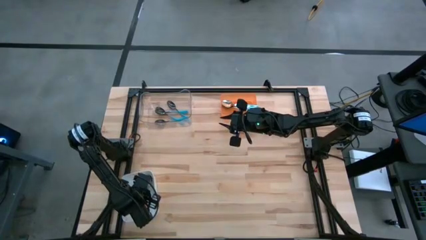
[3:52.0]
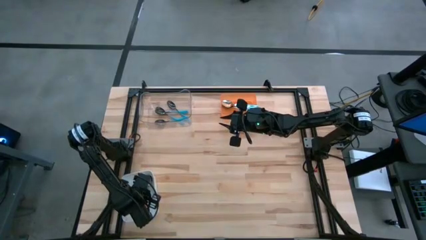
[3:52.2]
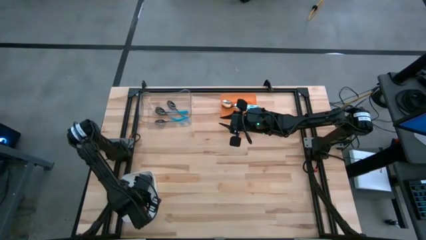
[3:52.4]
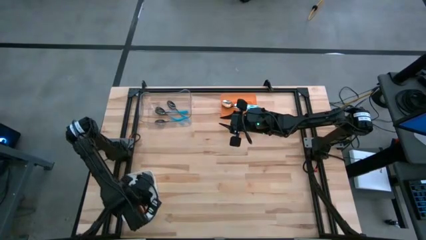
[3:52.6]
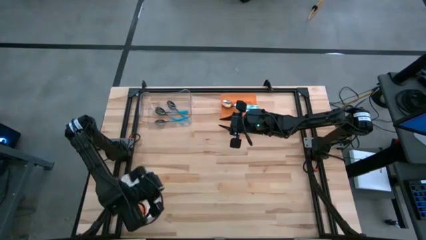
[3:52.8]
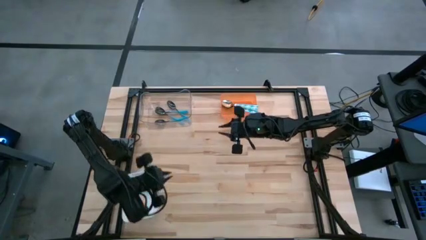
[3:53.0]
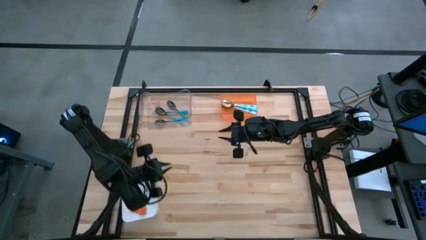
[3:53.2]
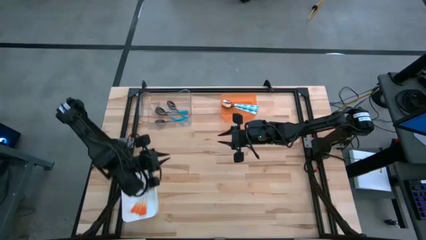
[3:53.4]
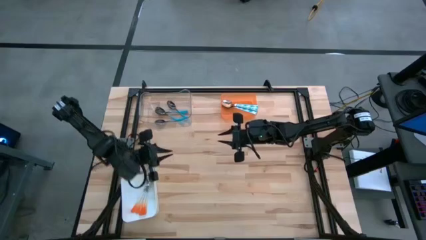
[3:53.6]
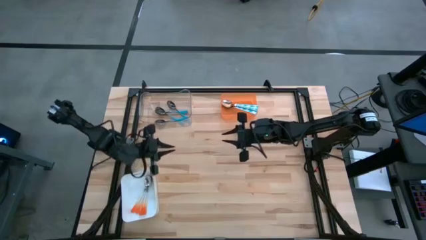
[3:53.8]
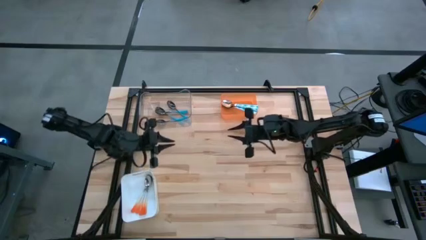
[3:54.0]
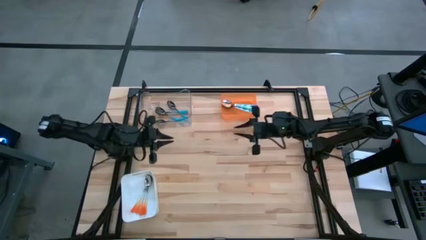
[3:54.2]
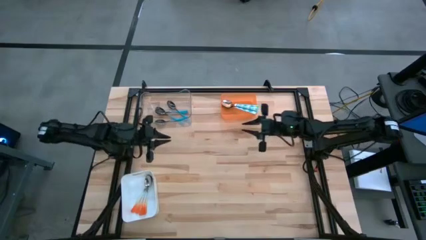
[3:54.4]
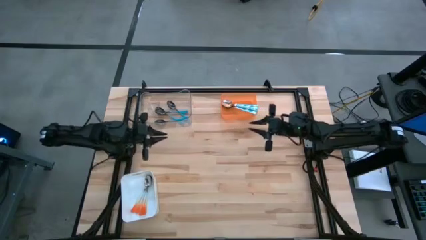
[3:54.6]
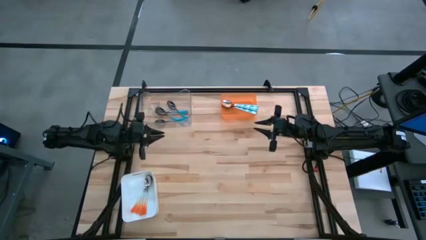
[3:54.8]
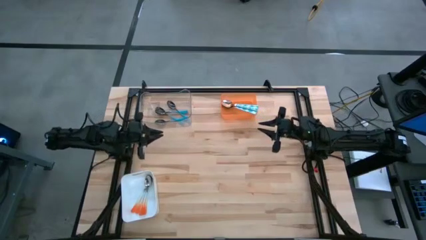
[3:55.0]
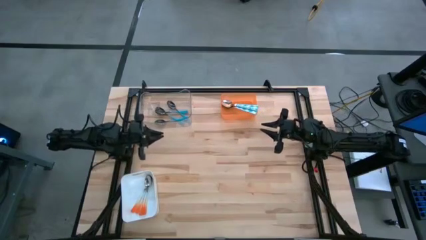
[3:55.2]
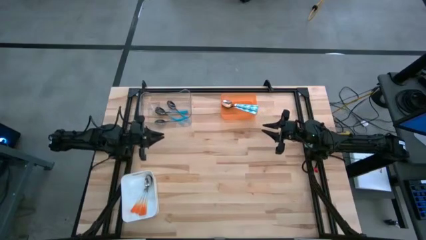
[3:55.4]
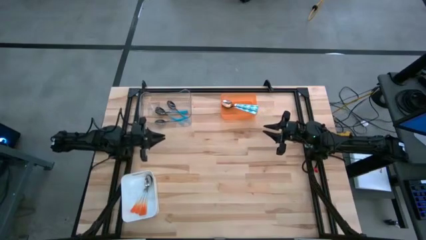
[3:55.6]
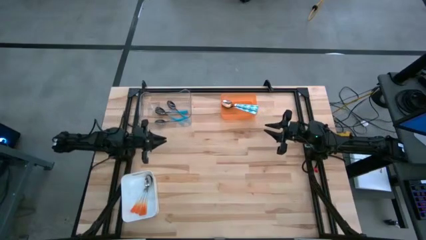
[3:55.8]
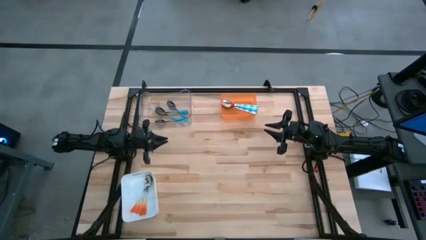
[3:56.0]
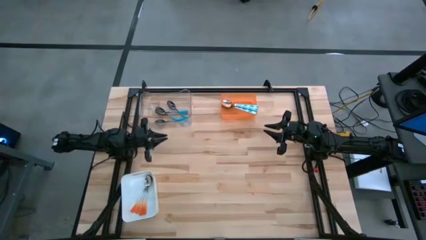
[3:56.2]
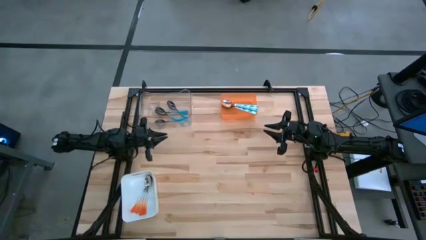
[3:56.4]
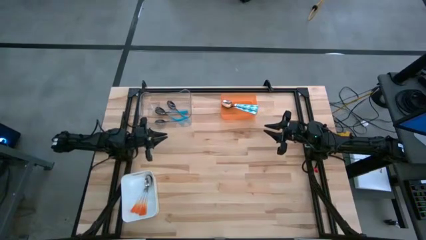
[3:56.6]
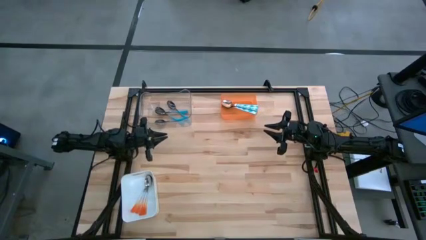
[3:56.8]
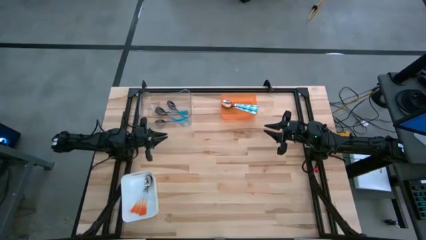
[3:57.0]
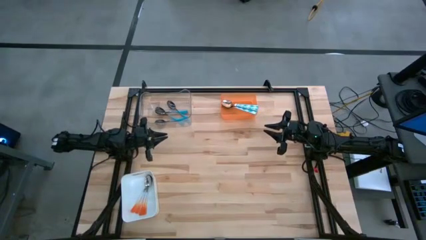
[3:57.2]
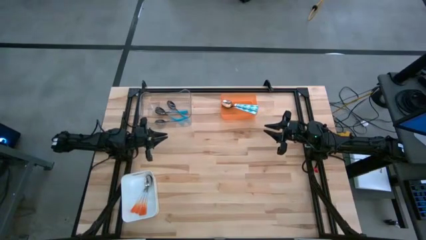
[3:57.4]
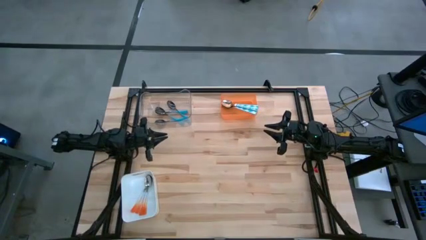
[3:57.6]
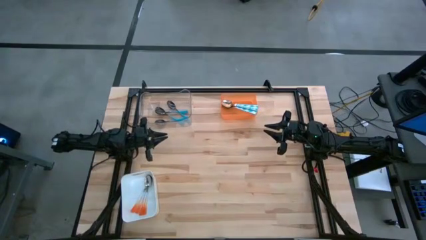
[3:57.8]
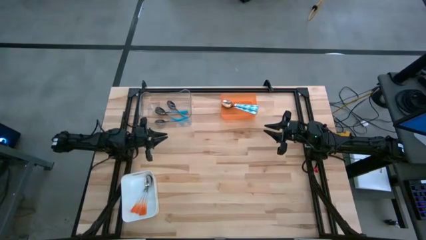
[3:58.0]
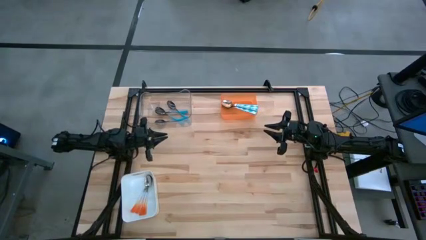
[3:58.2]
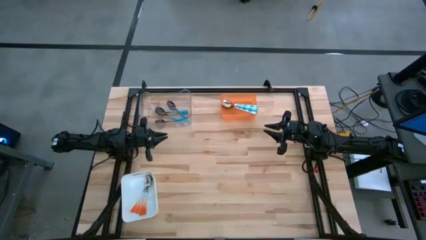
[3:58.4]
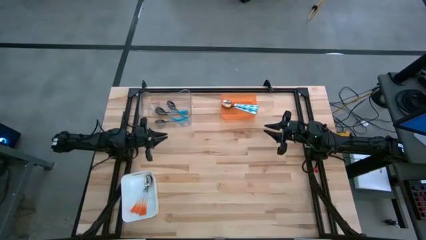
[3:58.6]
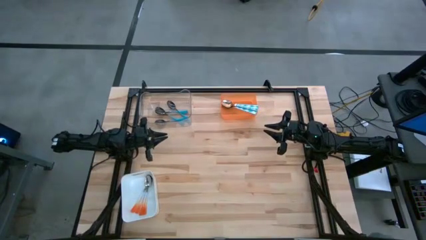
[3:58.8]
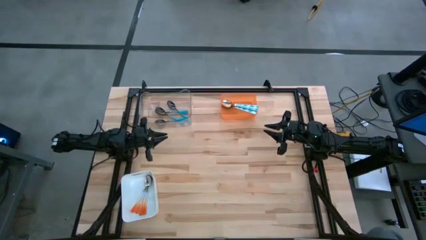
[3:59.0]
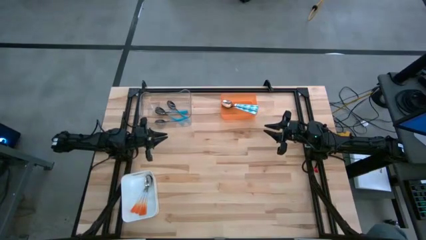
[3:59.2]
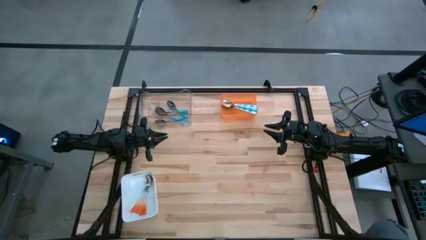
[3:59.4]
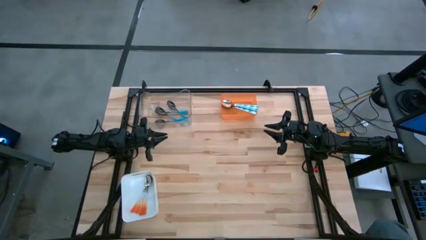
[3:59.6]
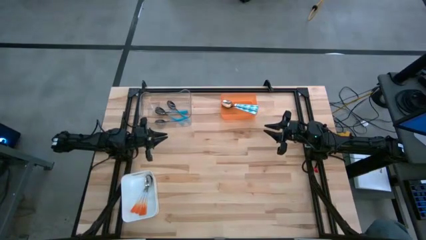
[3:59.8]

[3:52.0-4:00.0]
Task: Sort silverware by color (type)
Return to Home Position

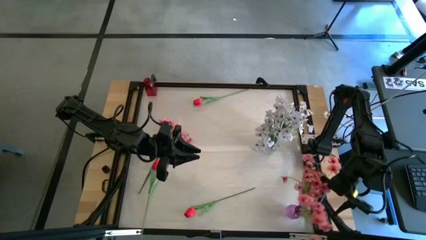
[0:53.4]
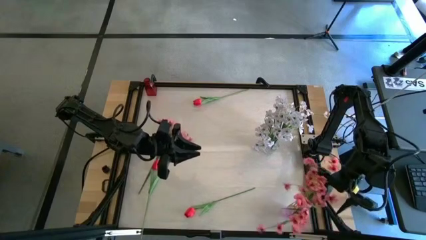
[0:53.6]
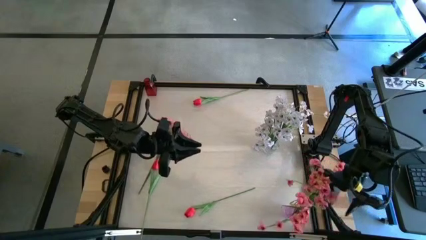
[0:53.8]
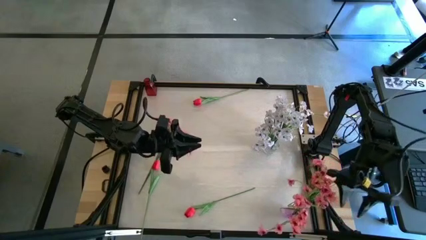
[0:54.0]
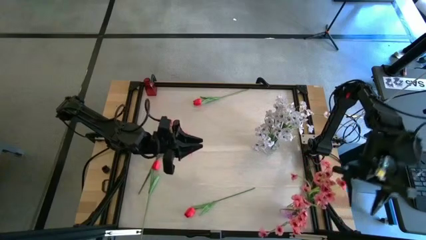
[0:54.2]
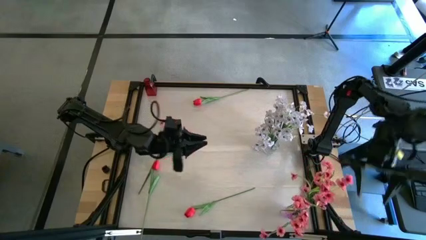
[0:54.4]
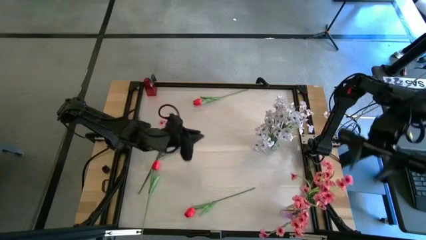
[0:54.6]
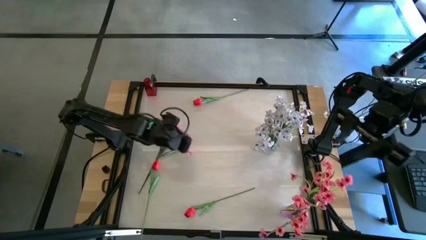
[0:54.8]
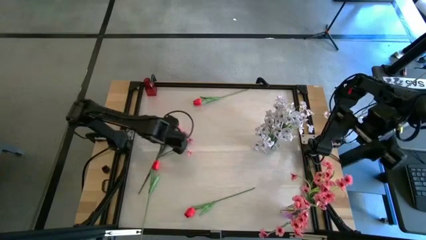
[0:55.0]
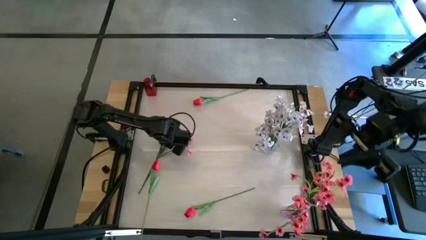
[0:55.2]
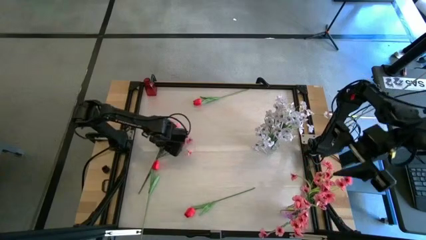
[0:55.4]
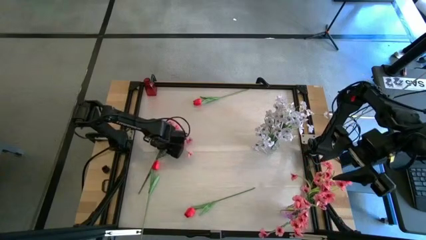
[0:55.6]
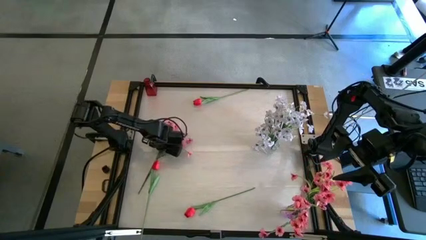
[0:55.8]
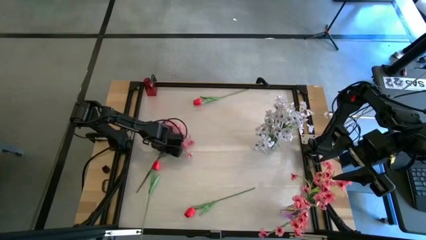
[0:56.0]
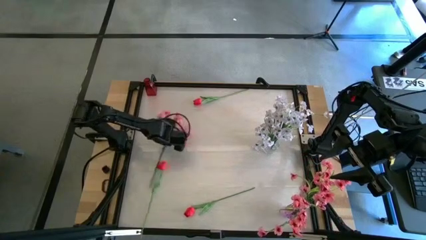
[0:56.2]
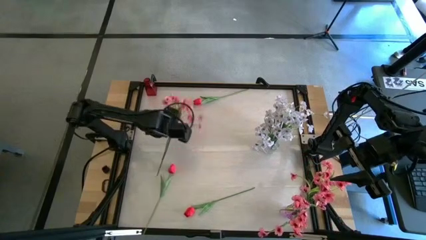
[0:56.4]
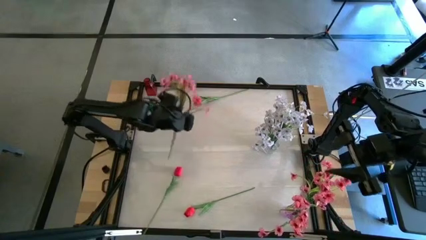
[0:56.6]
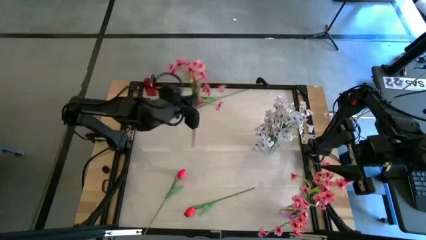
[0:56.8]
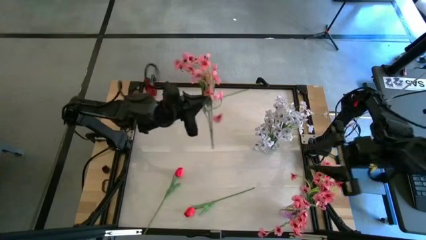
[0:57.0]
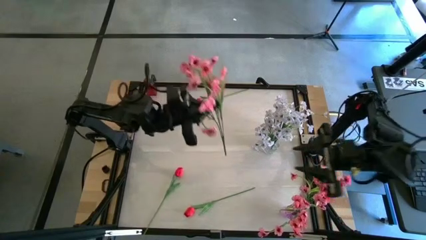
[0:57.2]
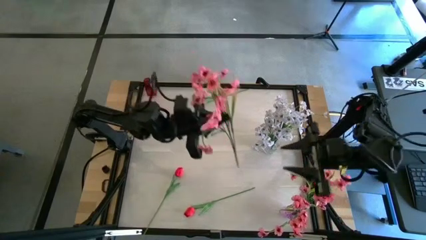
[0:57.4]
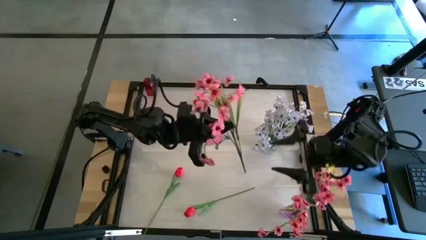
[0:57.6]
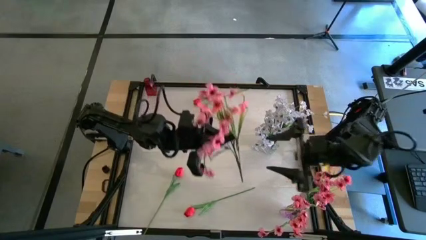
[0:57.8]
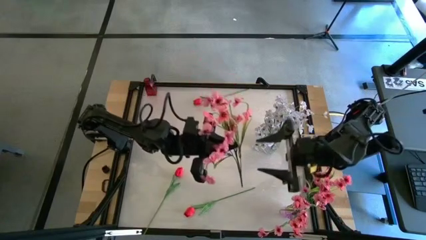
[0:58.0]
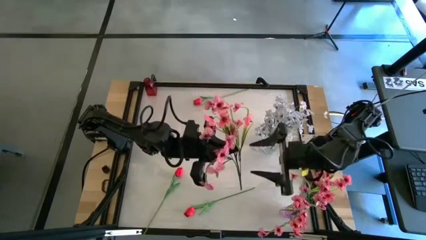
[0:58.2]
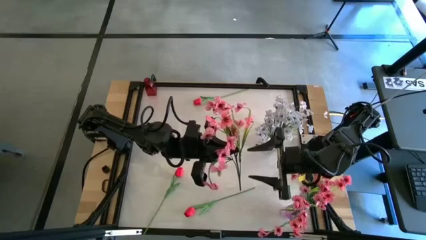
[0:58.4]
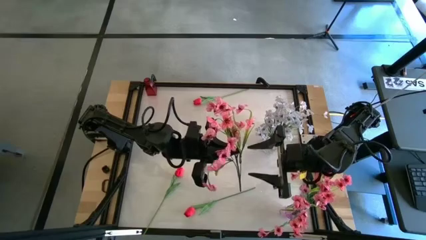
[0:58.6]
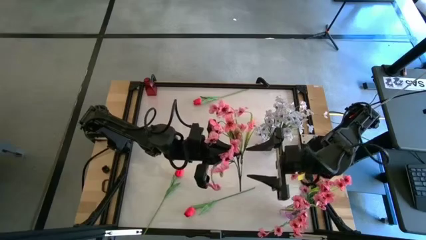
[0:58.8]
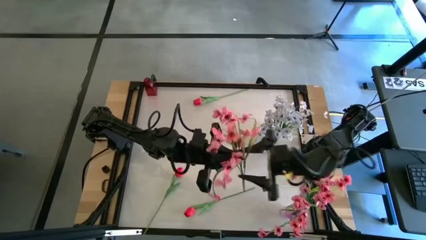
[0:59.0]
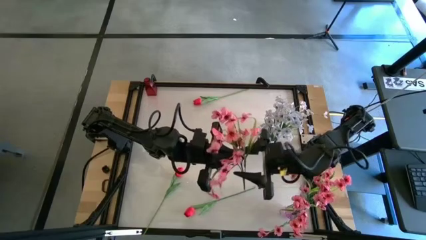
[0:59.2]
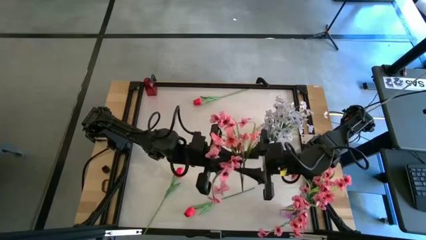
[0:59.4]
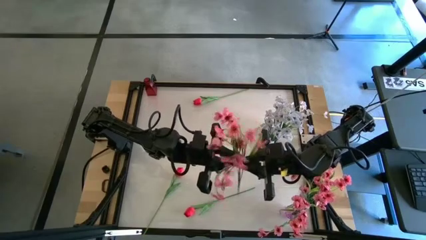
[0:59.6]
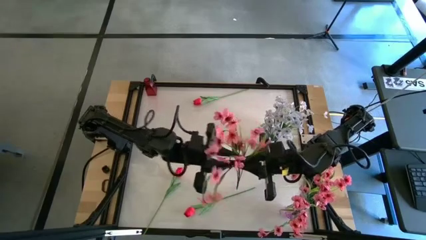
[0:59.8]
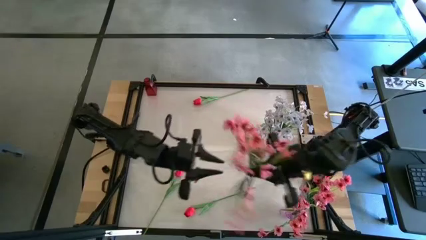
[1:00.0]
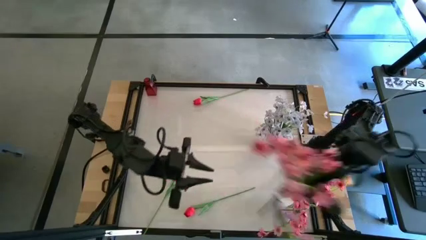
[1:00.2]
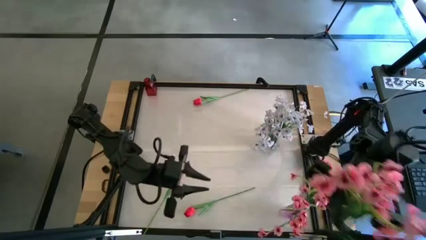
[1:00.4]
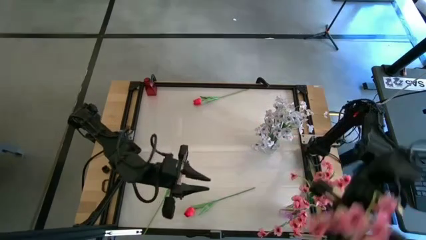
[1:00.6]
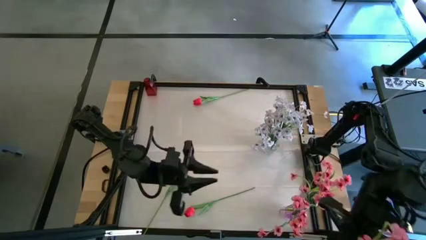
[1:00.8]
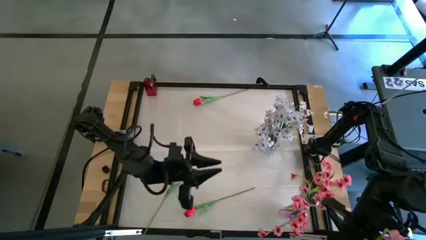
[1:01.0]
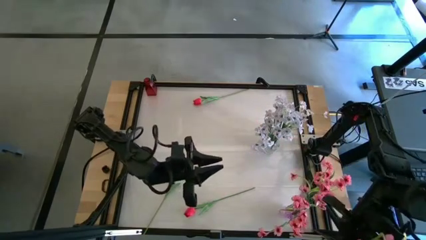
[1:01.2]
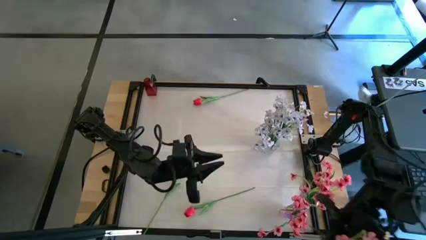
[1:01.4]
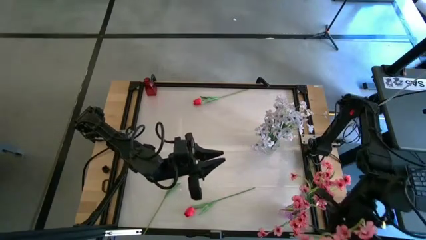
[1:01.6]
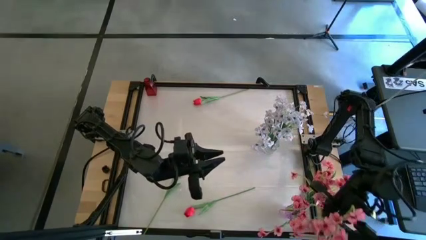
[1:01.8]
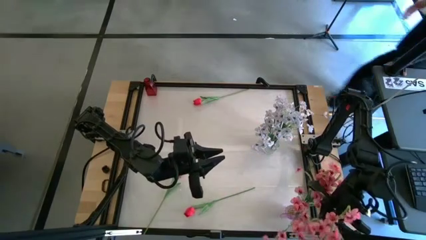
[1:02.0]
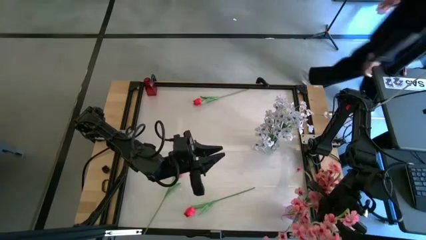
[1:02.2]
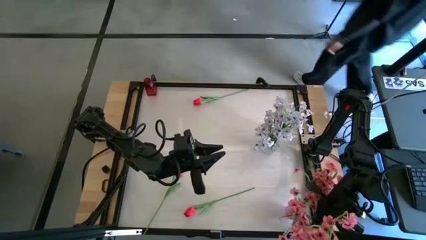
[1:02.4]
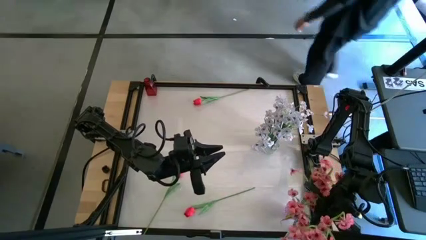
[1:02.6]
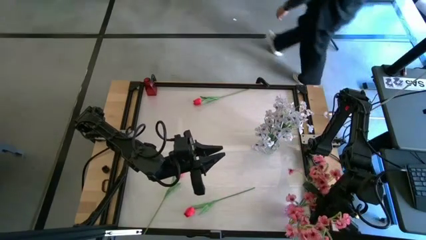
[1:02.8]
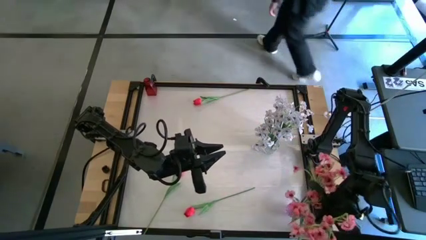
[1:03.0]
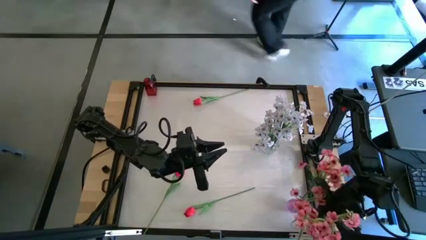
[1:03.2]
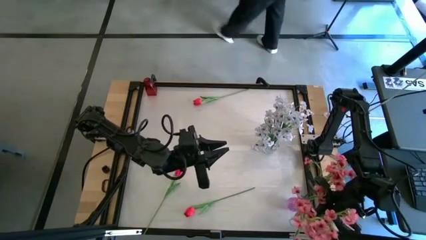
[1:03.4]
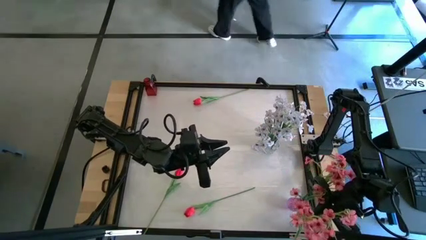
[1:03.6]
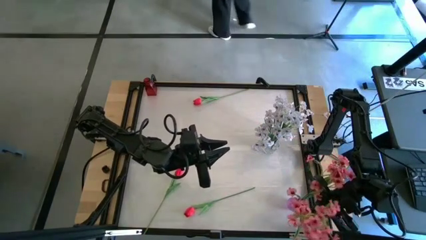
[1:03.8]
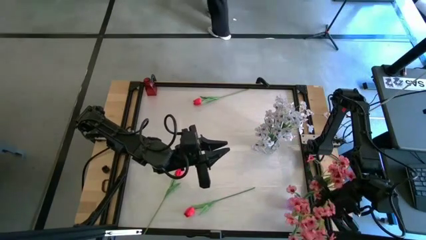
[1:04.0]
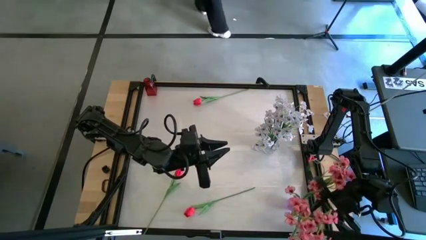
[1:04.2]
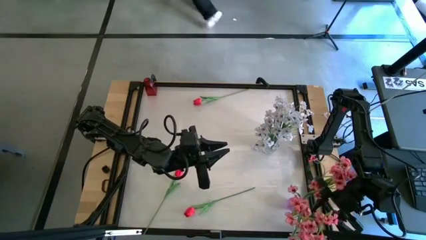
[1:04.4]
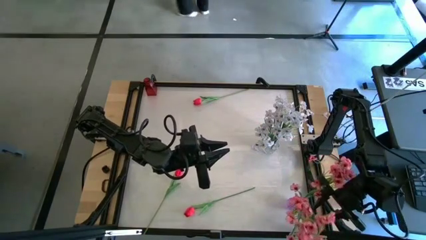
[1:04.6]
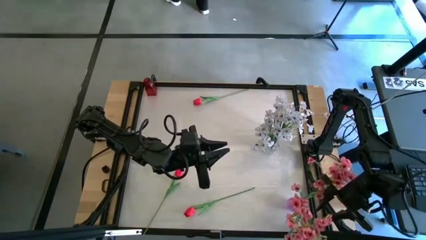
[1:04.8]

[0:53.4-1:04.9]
Task: Sort flowers into vase by color
Put the pink flowers into the violet vase
